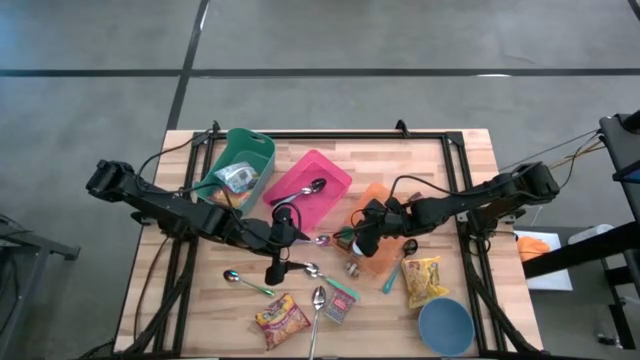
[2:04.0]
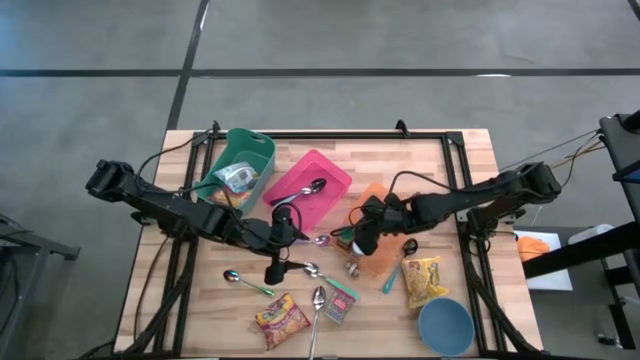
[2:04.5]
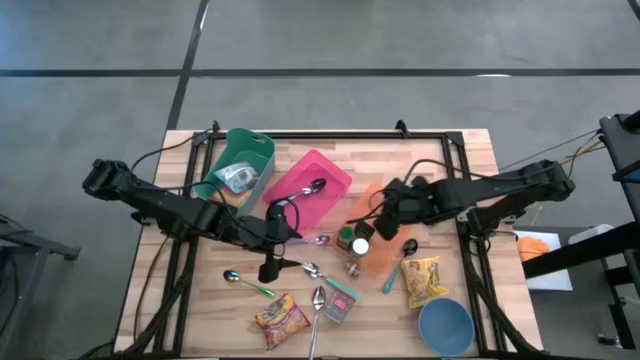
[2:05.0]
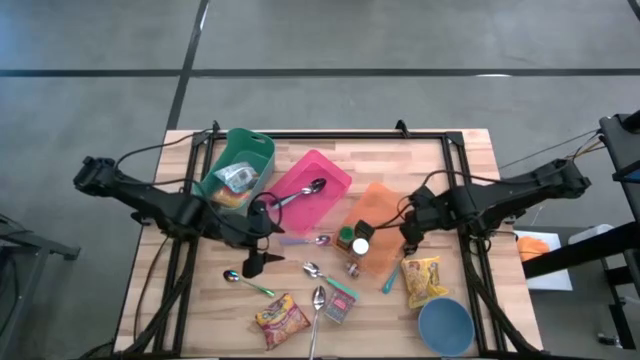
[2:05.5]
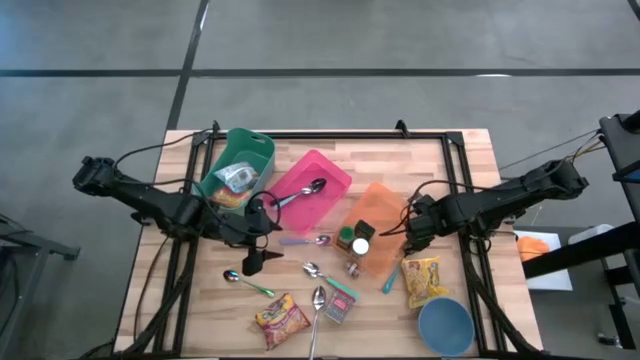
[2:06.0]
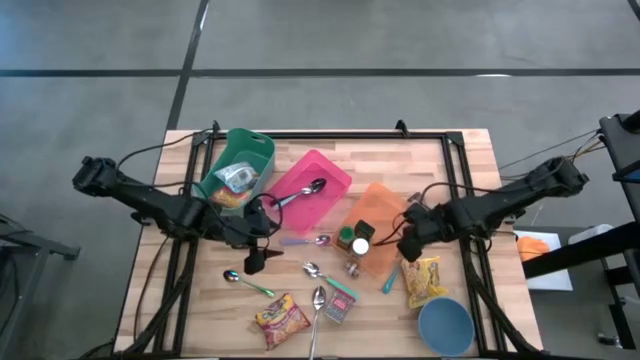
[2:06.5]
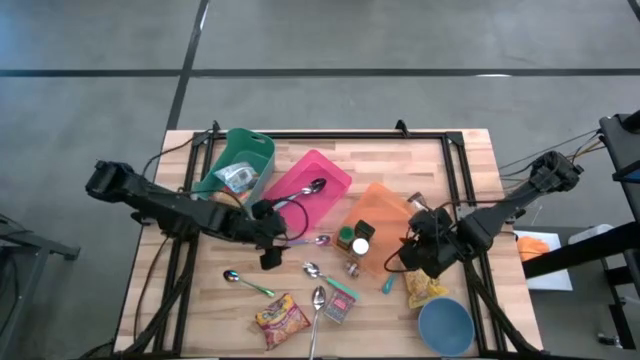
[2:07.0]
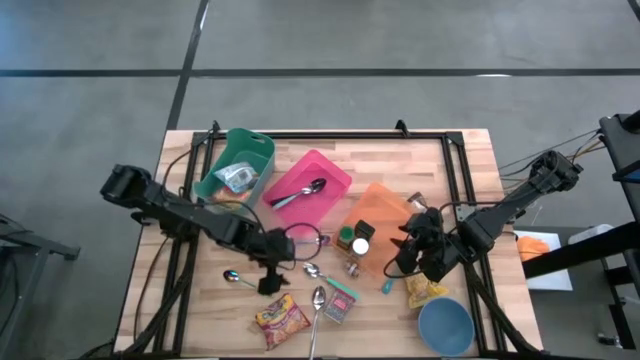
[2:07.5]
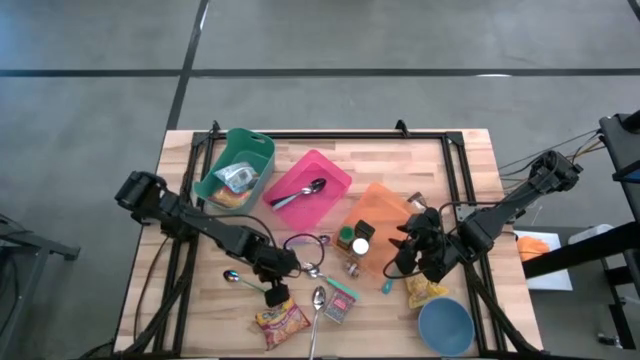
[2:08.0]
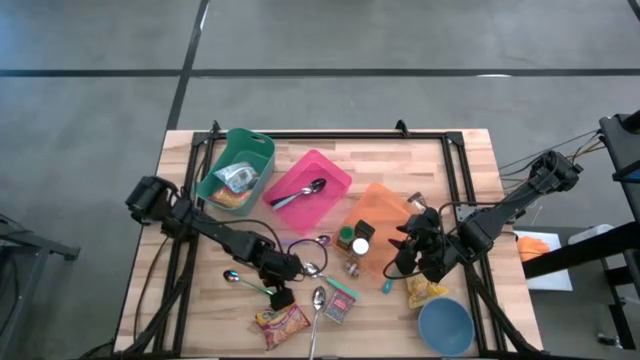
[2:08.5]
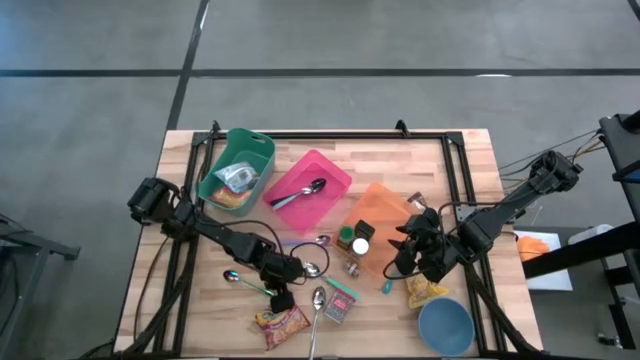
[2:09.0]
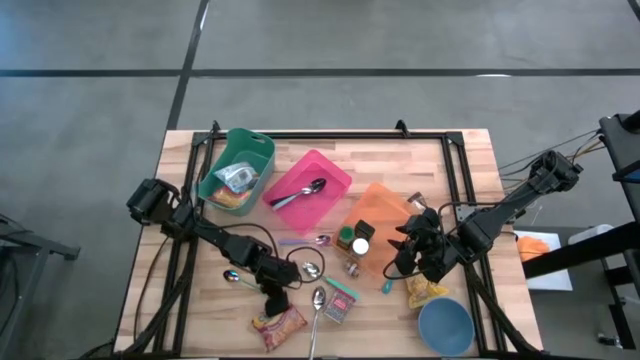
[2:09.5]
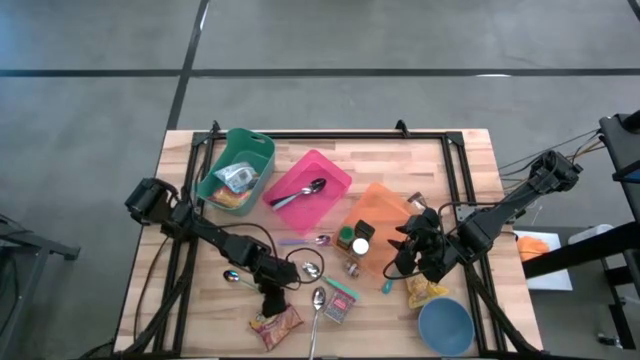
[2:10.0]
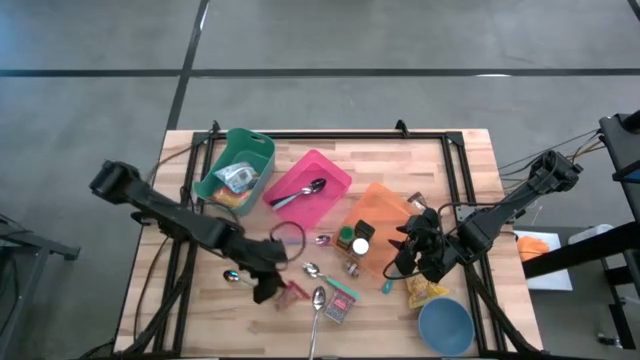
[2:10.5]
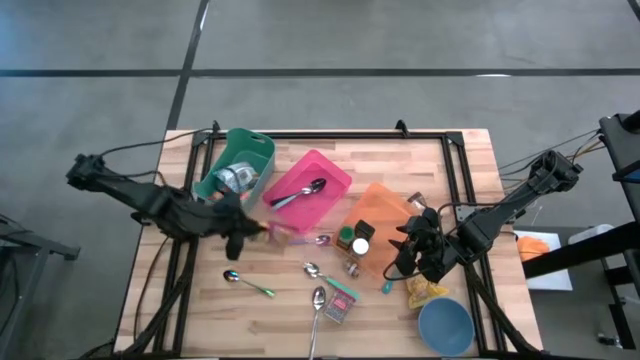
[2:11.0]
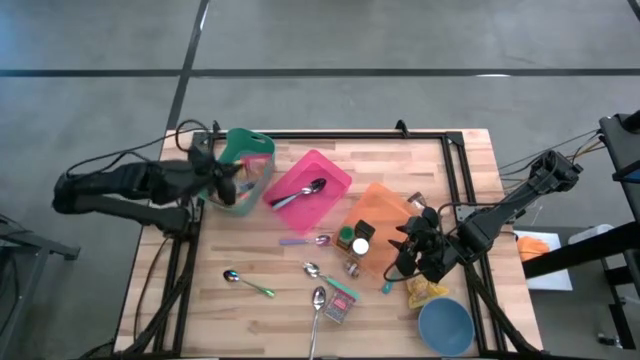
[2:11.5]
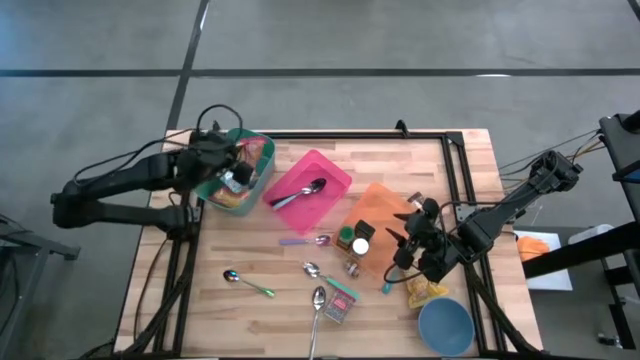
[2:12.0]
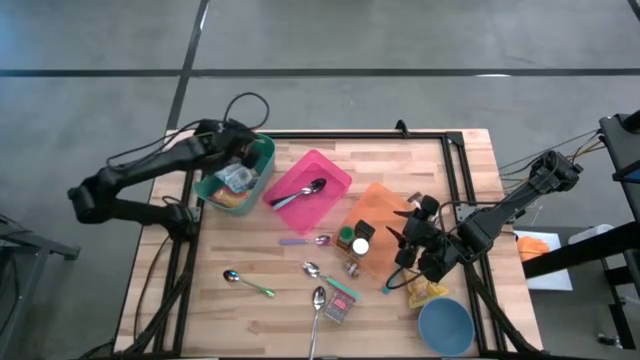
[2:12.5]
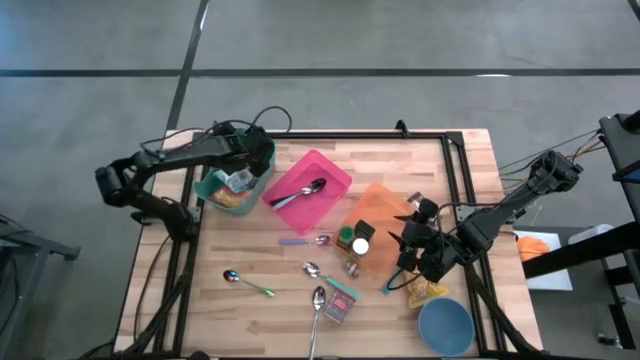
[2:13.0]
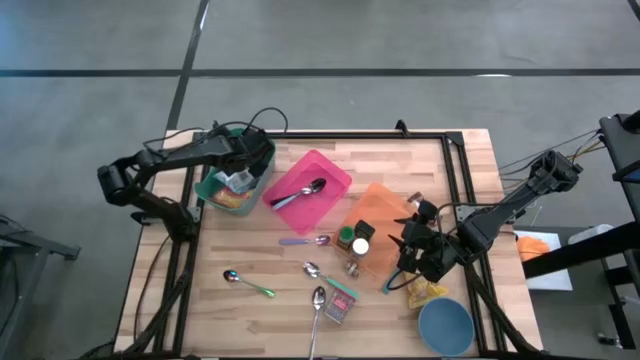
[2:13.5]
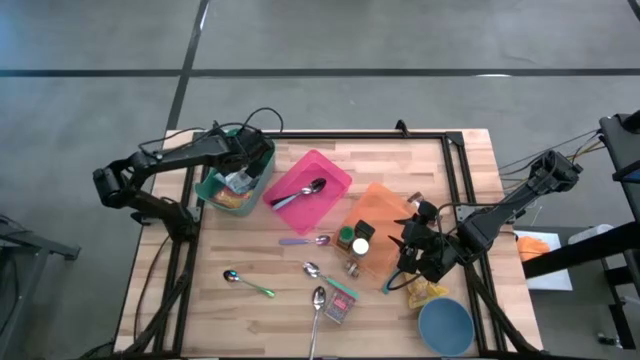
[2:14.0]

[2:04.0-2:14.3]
Put the red noodle pack into the green bin

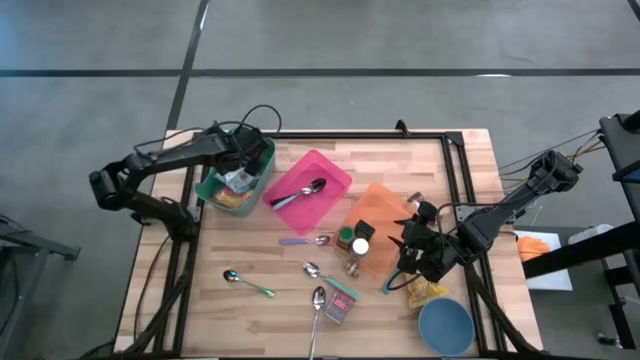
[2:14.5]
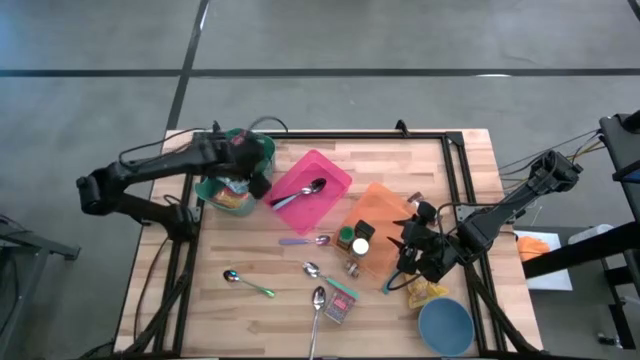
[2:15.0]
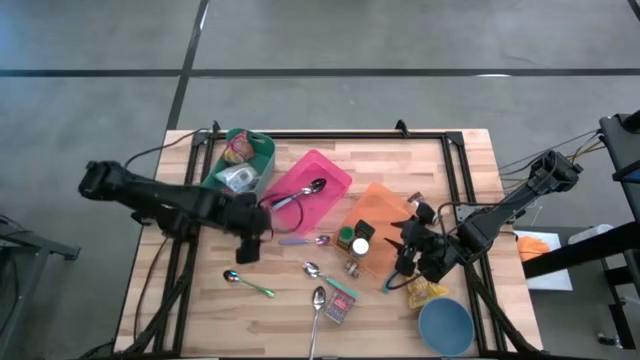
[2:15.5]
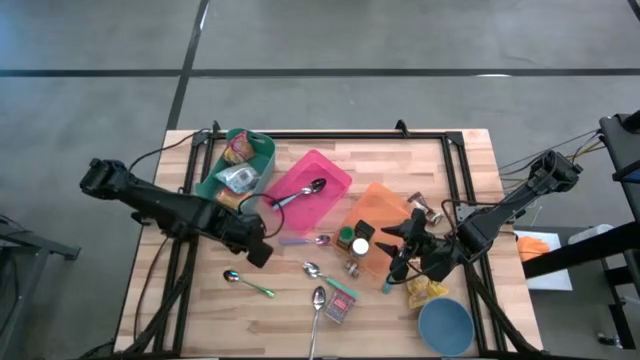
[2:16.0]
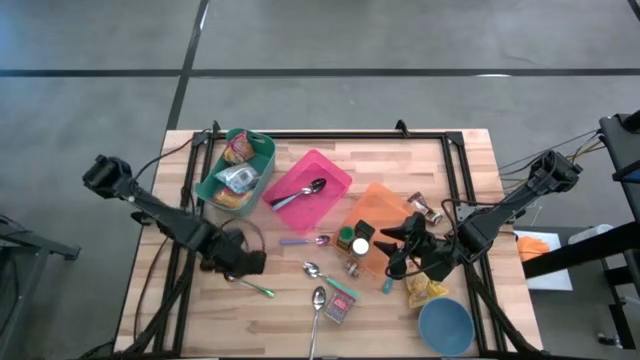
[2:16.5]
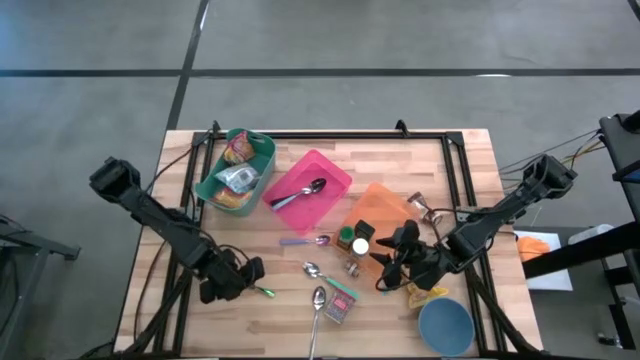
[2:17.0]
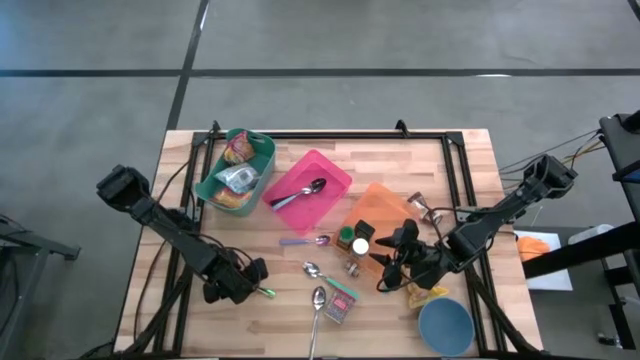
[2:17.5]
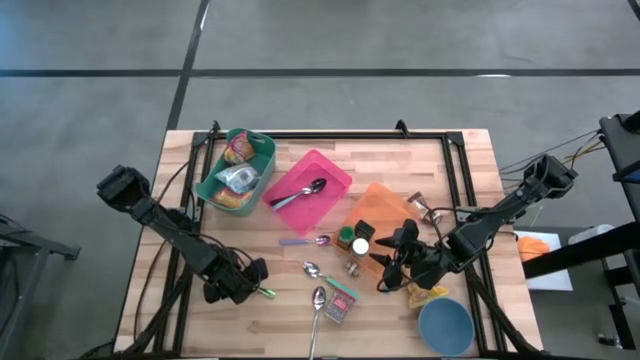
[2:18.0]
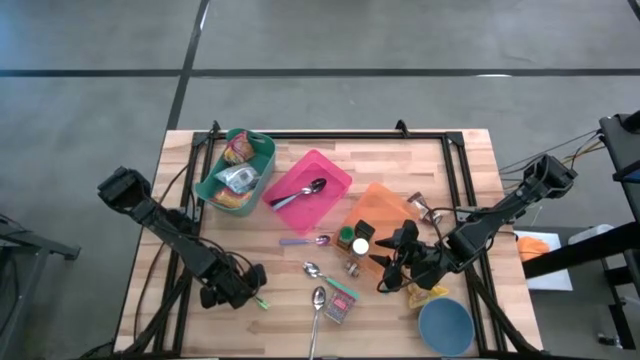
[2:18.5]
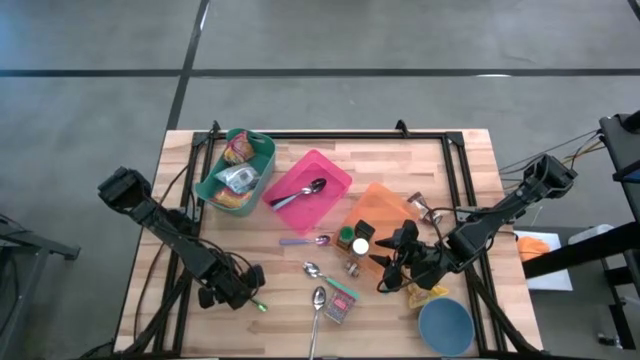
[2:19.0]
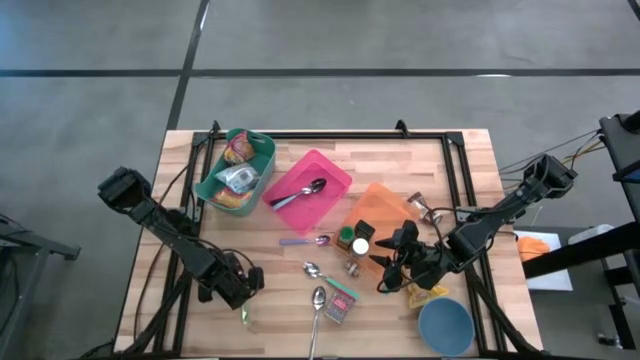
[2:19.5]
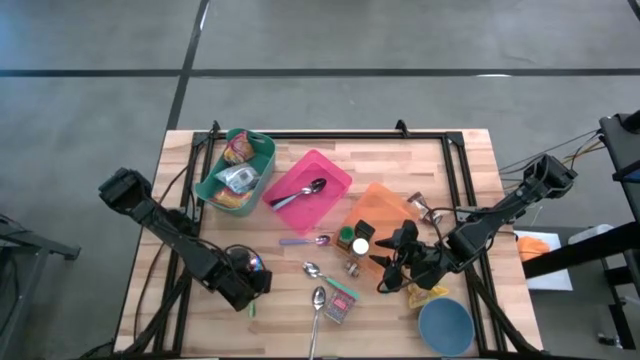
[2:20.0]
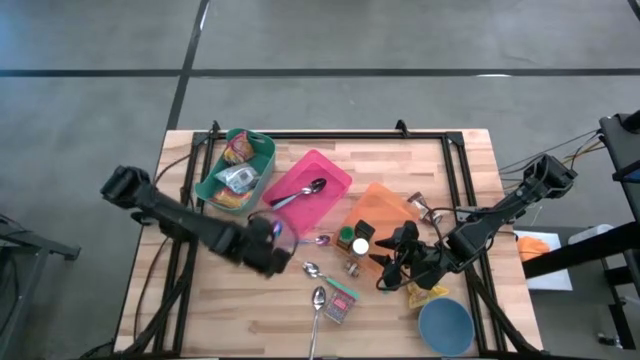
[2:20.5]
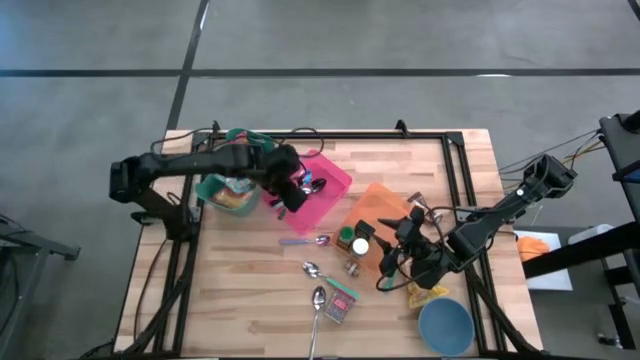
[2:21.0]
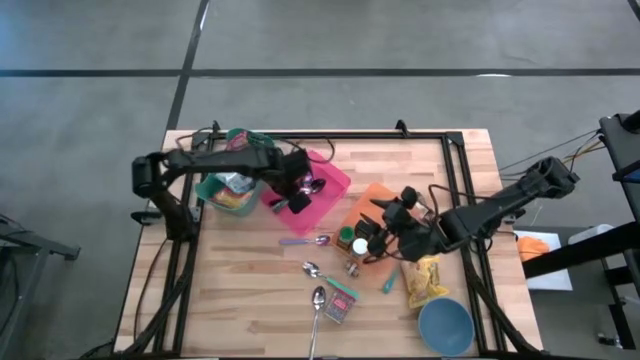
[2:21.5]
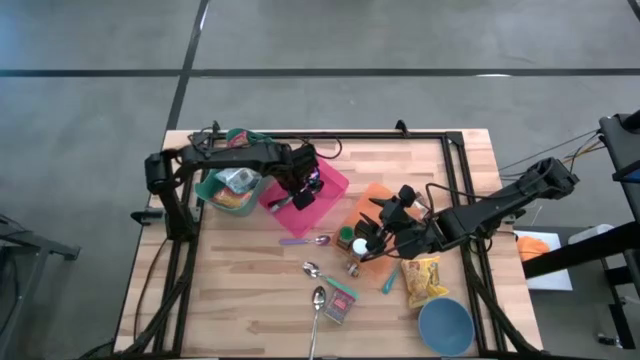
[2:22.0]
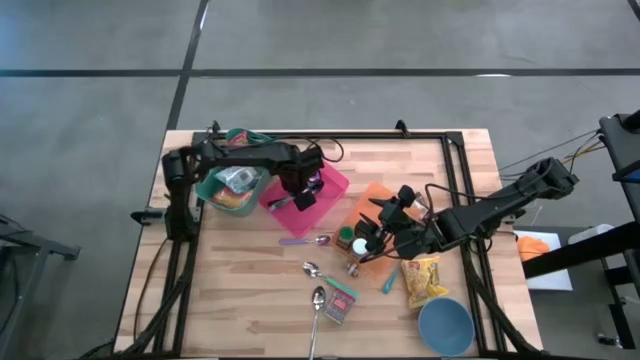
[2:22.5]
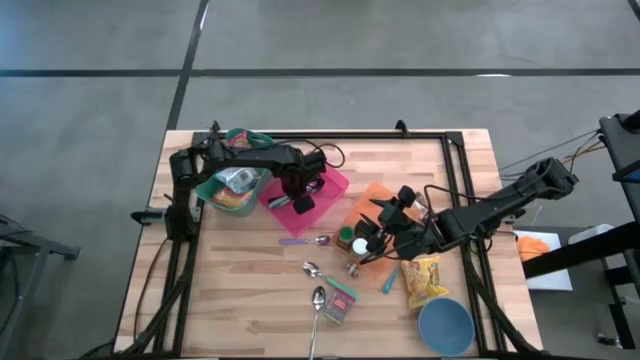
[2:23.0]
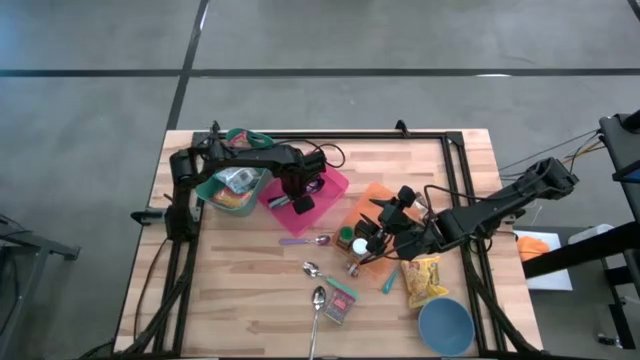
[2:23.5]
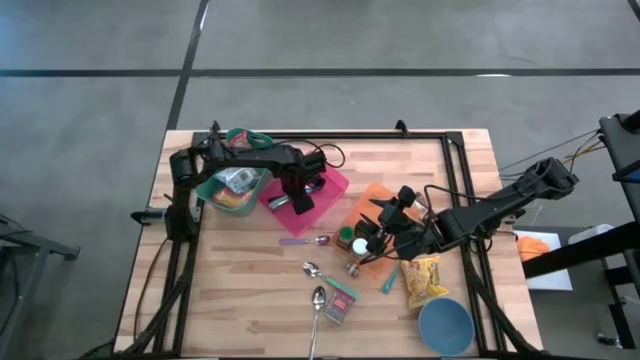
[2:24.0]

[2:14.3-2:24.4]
Put the blue spoon into the pink bin

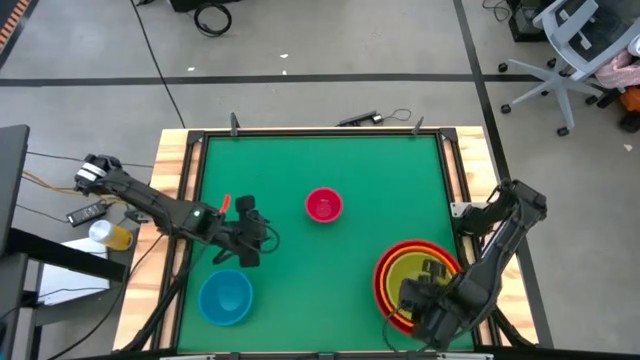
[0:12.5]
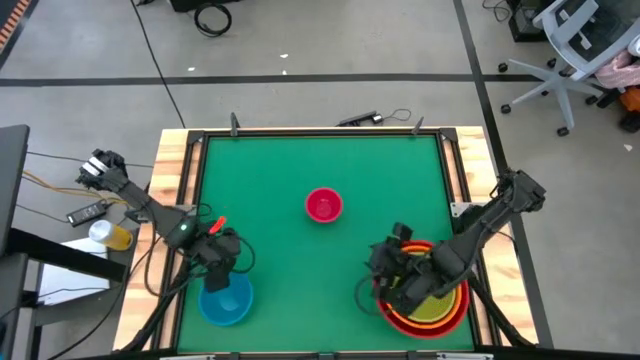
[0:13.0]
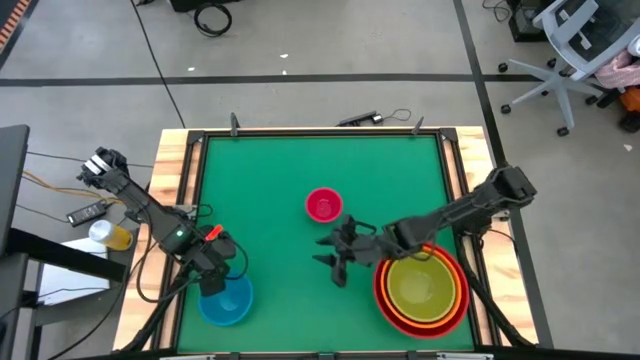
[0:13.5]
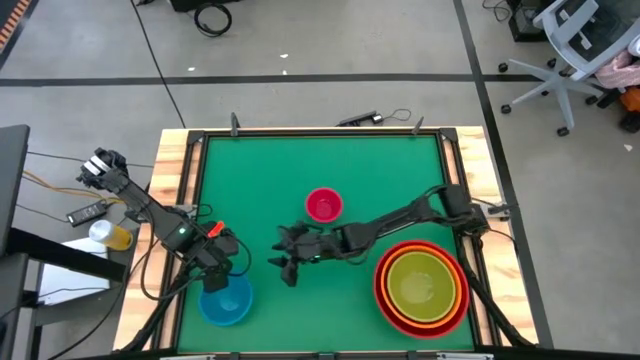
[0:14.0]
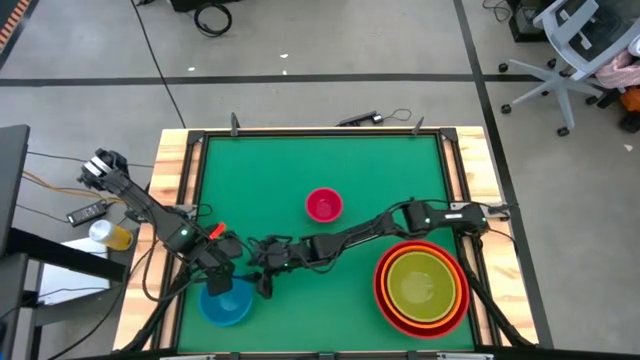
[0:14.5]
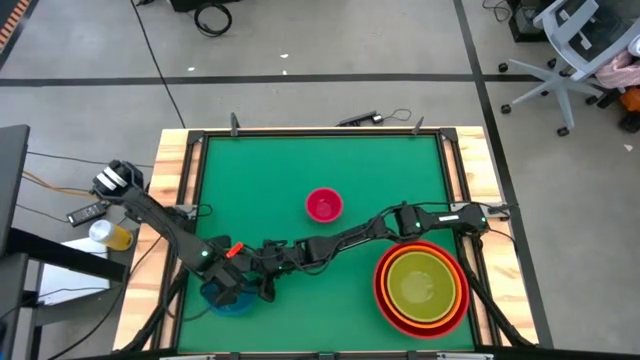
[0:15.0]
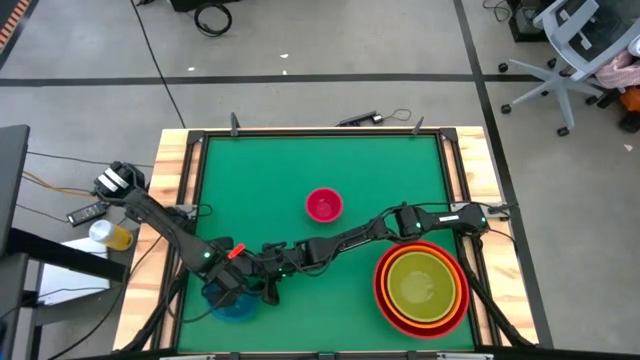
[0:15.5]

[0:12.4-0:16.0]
Stack the blue bowl on top of the green bowl
